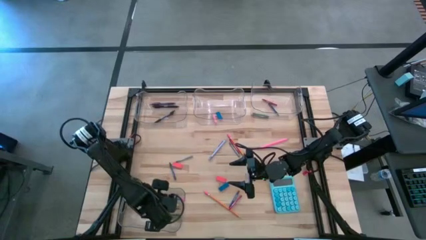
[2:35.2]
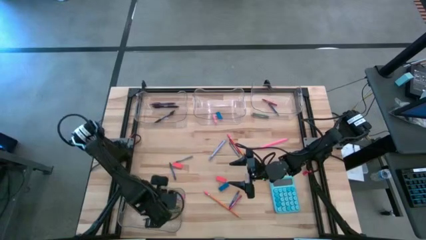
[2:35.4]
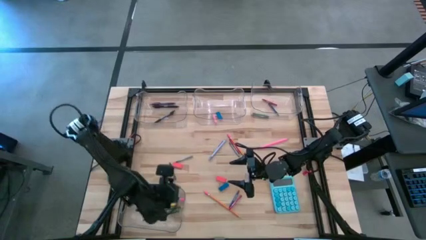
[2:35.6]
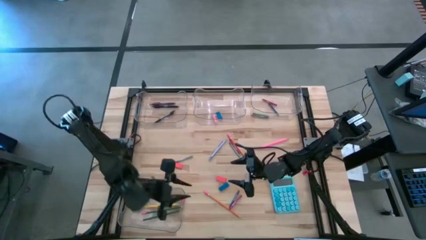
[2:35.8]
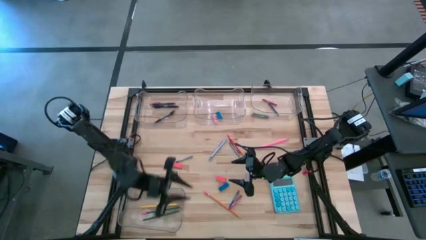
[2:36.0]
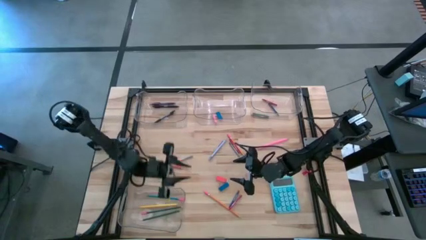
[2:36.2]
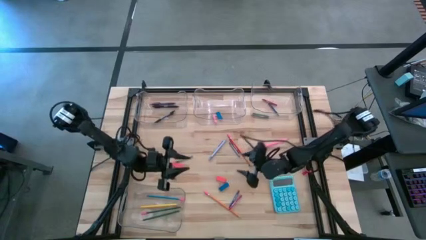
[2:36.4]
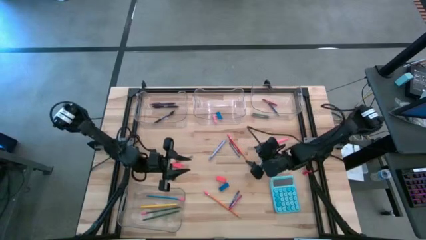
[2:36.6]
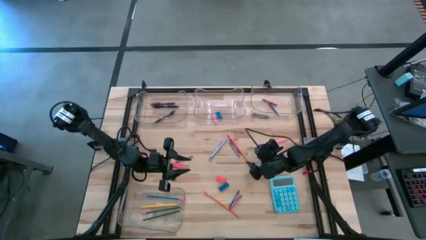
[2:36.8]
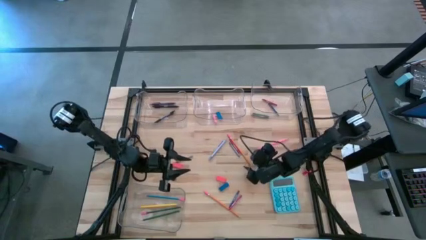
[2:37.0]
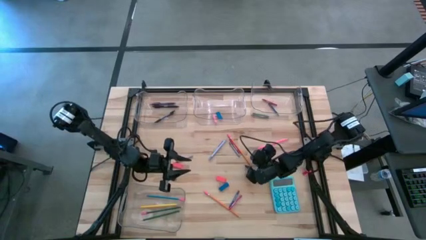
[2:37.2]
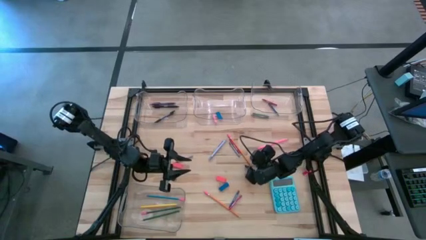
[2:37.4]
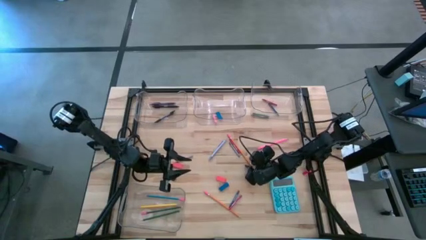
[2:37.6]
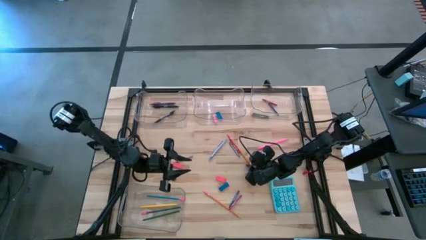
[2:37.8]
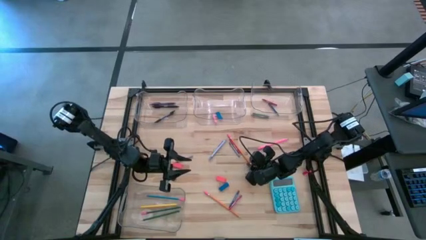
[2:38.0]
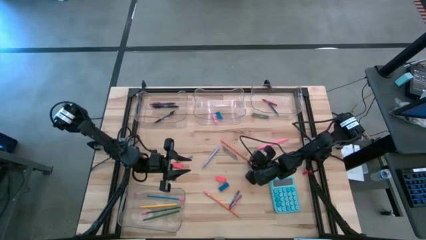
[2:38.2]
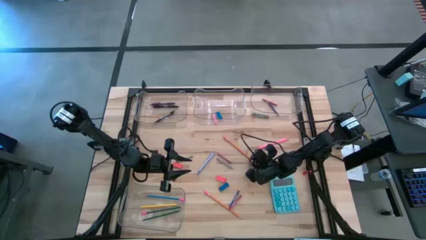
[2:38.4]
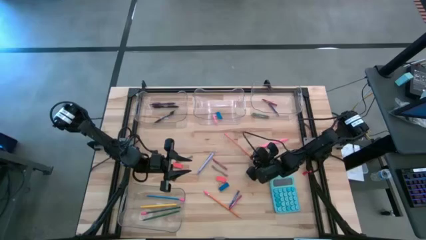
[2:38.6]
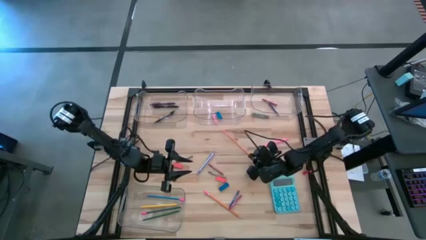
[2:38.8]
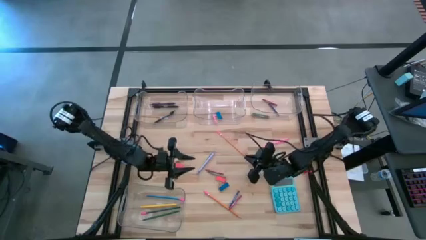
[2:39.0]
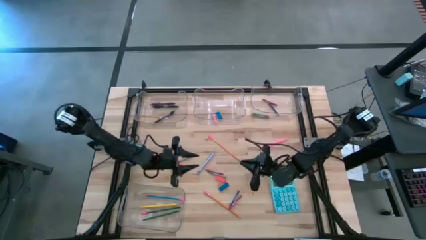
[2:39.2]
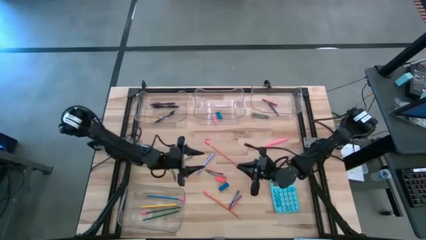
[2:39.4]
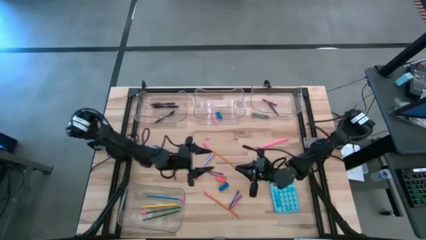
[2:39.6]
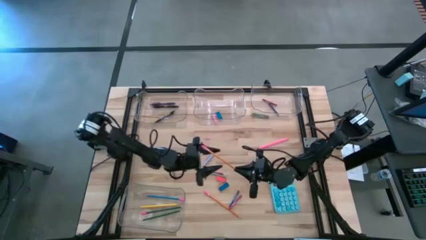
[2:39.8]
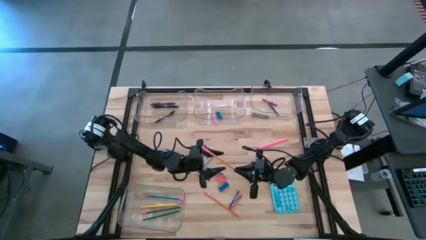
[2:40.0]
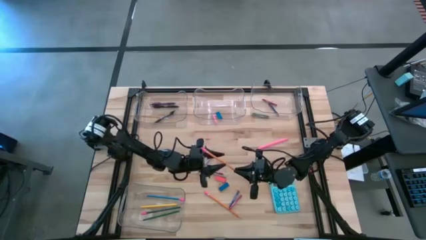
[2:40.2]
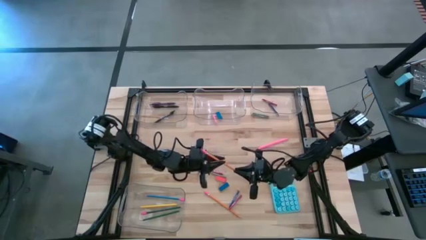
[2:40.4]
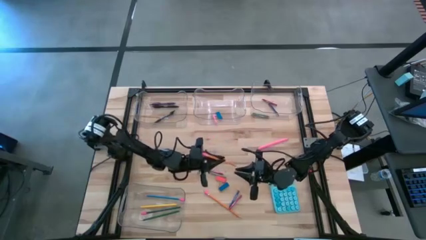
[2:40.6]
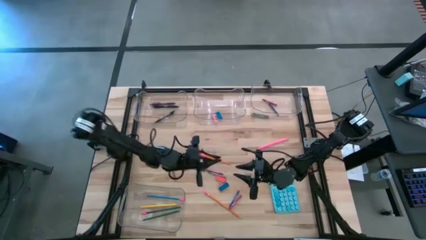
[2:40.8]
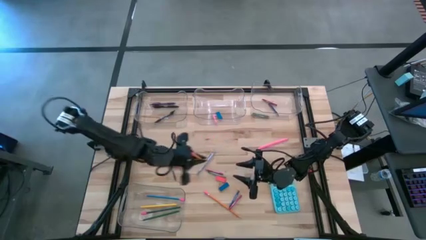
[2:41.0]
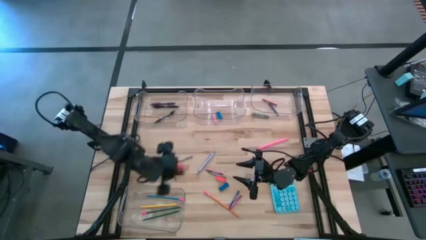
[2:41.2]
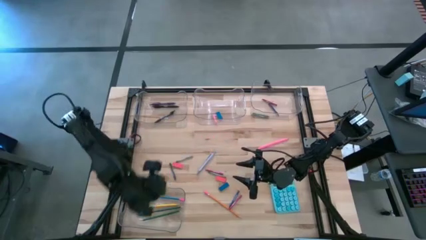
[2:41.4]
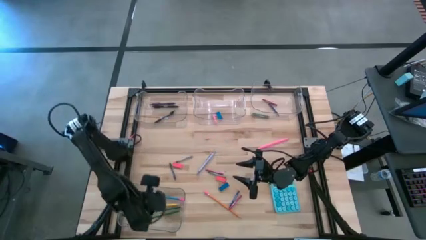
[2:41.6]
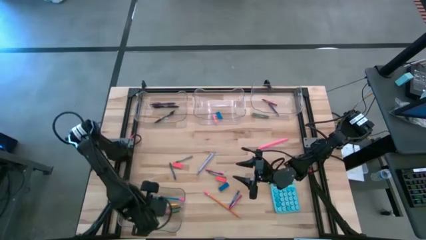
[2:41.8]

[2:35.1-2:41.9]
Task: Sort crayons/erasers/pens/pencils in bins
Put the orange pencil into the bottom transparent bin

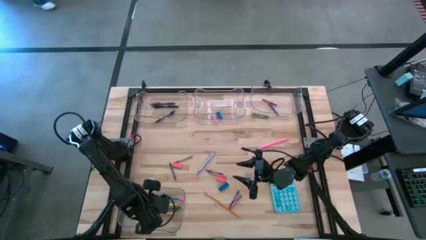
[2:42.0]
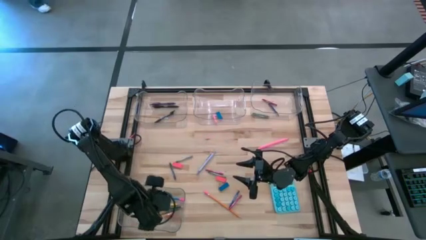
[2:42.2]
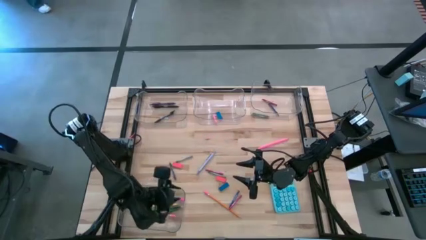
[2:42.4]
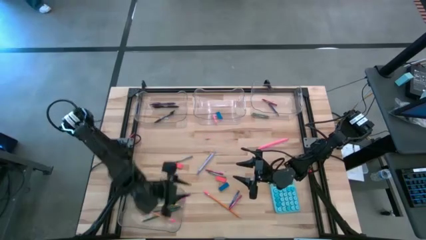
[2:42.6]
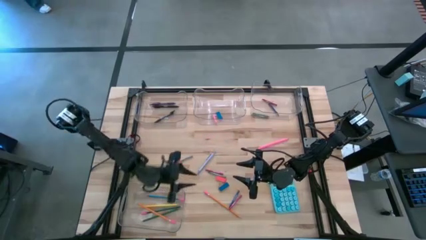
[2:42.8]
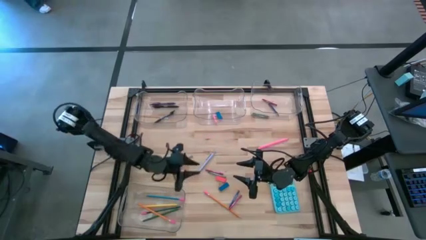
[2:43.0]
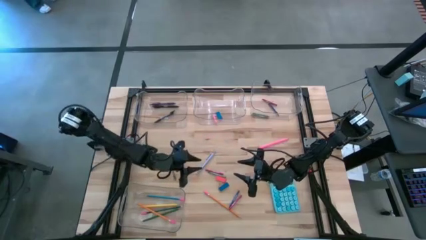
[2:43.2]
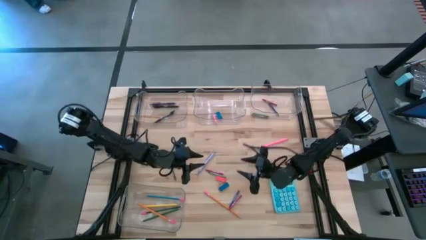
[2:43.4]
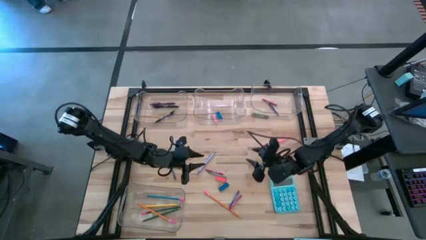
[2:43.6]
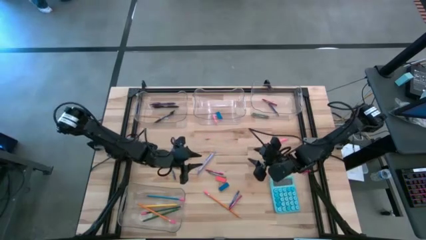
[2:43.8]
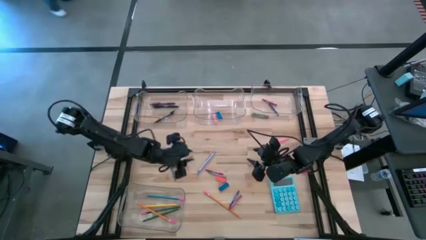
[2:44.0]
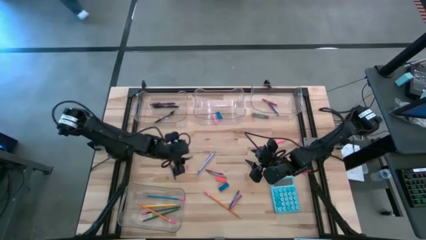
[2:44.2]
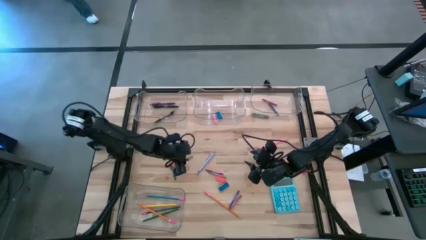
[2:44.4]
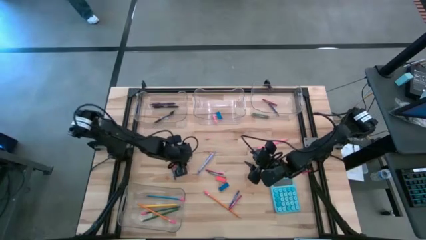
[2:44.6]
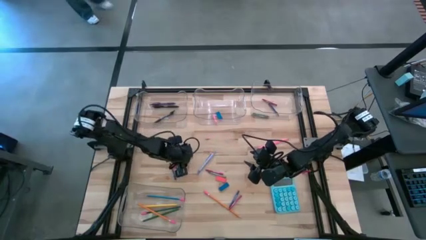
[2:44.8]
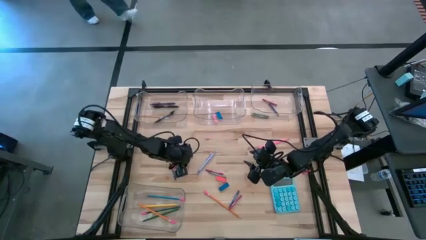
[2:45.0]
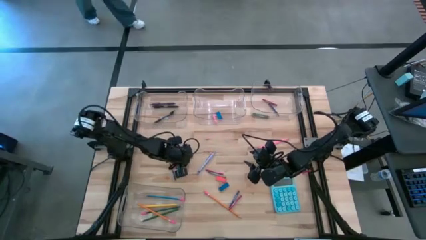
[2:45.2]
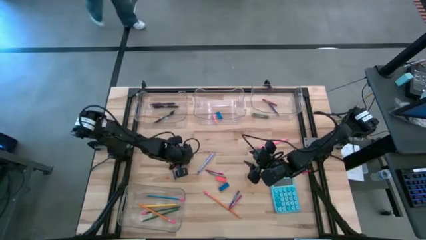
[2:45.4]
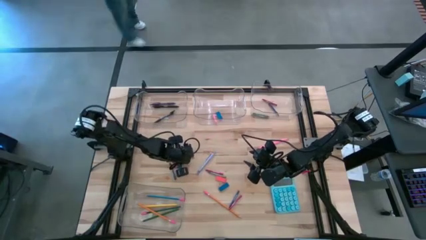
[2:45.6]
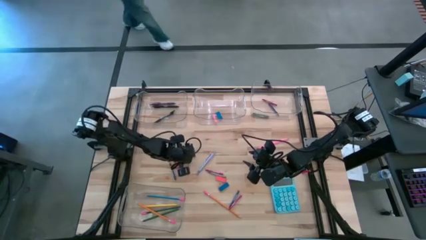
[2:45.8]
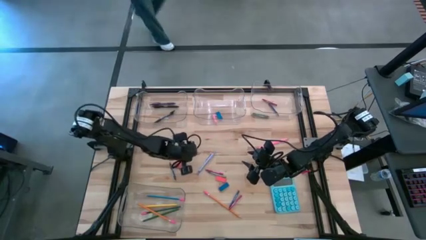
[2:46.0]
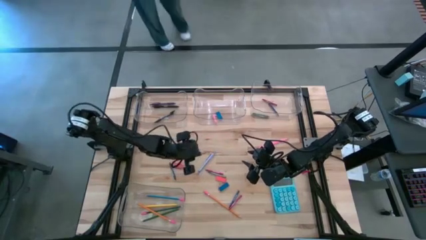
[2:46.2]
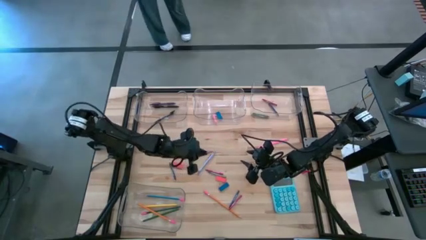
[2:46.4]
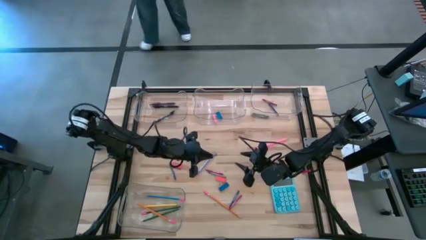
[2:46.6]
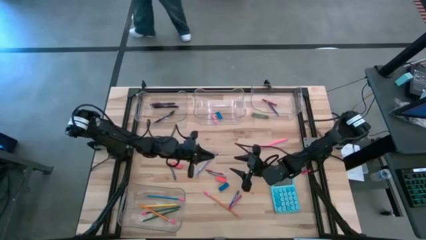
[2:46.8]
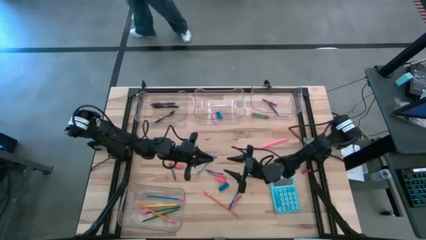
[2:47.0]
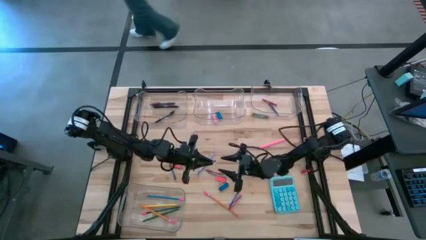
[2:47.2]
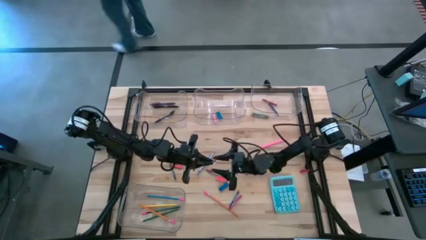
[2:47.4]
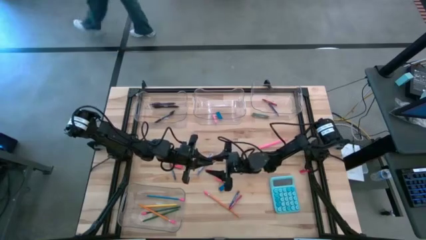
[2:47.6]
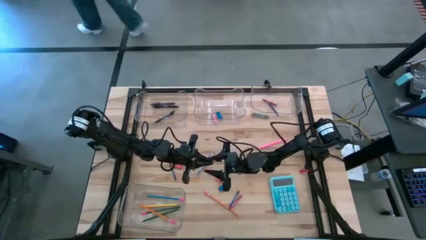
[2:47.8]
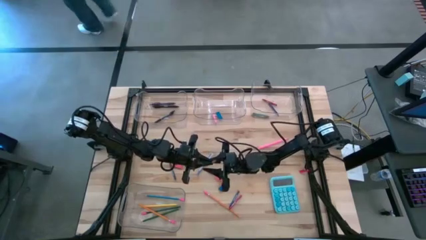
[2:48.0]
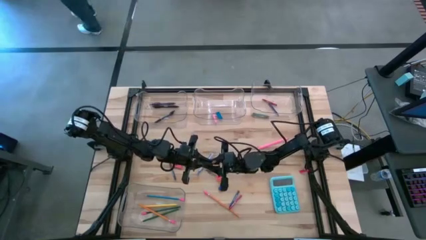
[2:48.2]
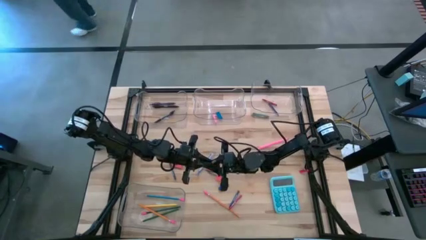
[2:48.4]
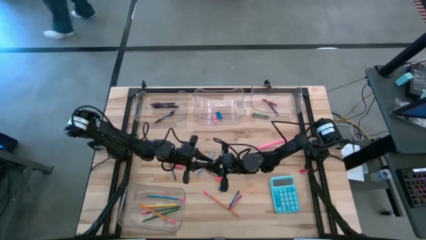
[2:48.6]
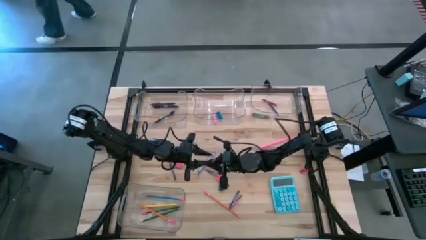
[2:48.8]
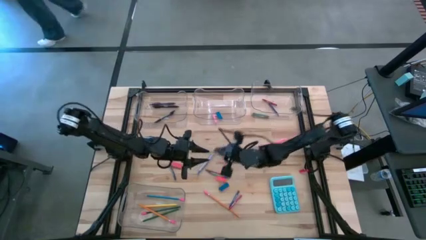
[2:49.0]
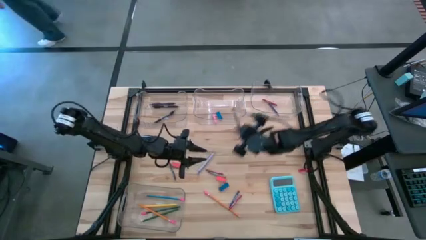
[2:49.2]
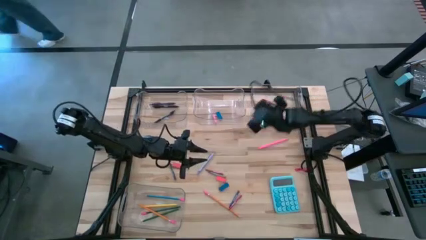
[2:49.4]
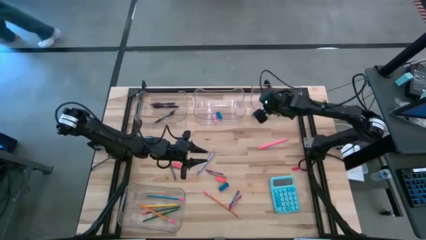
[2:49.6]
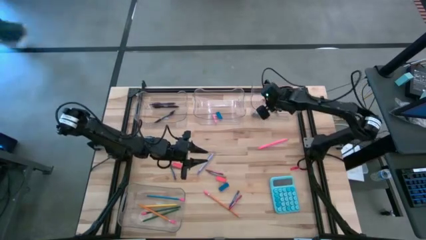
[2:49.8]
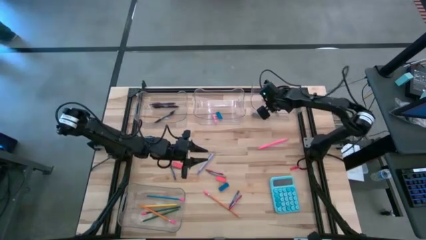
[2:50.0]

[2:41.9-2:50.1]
Put the gray crayon into the top right transparent bin

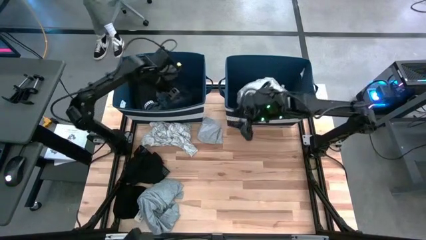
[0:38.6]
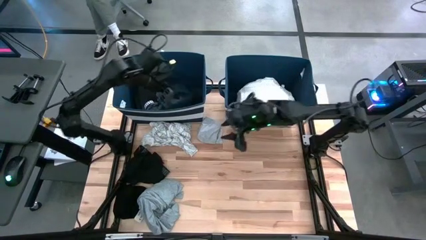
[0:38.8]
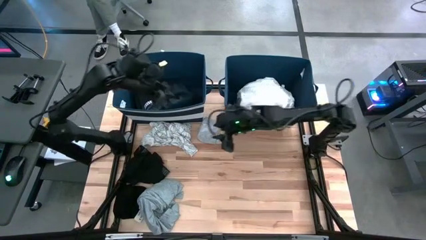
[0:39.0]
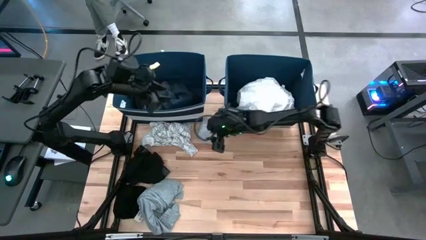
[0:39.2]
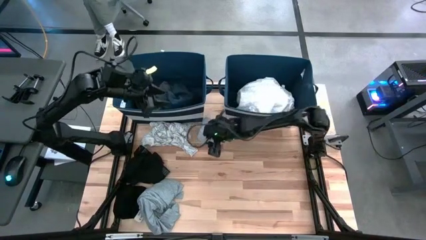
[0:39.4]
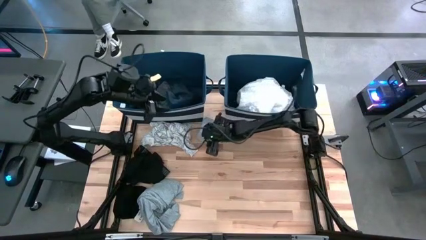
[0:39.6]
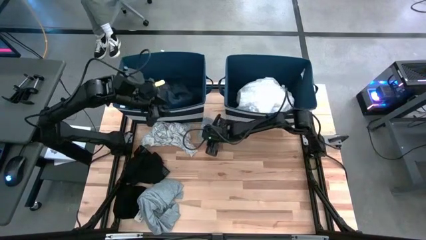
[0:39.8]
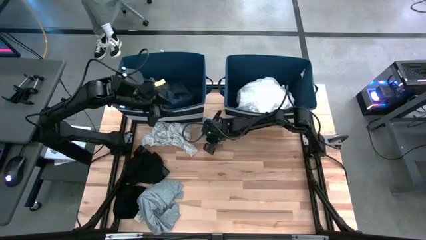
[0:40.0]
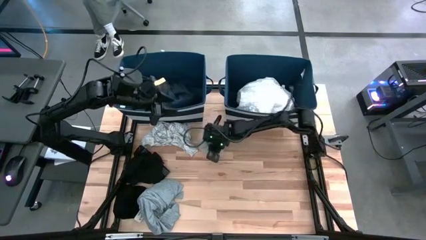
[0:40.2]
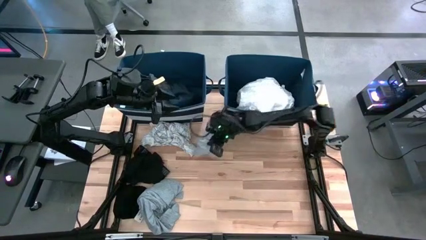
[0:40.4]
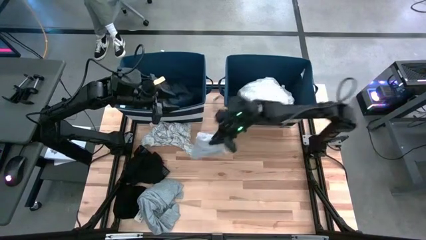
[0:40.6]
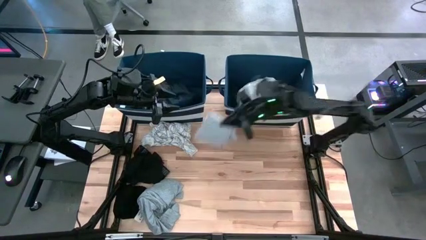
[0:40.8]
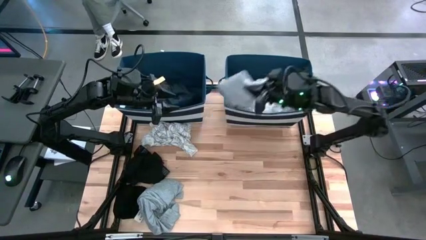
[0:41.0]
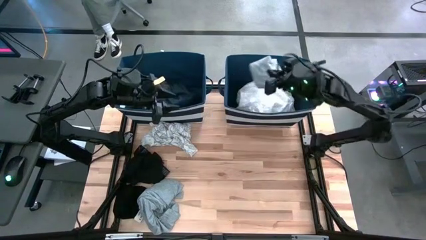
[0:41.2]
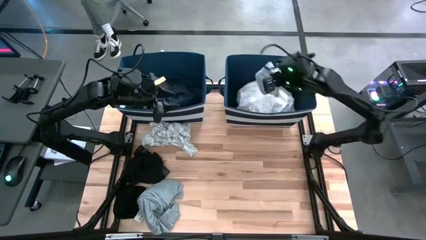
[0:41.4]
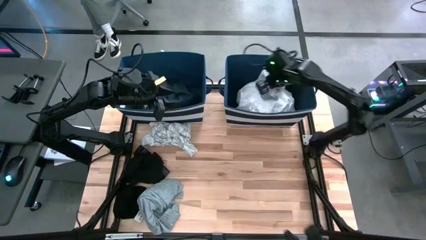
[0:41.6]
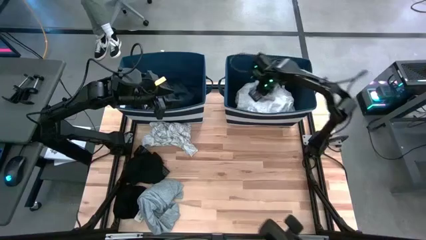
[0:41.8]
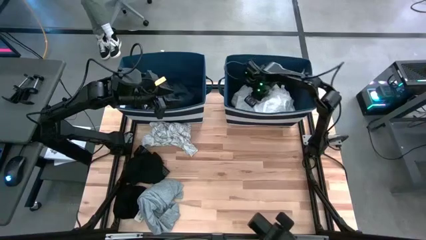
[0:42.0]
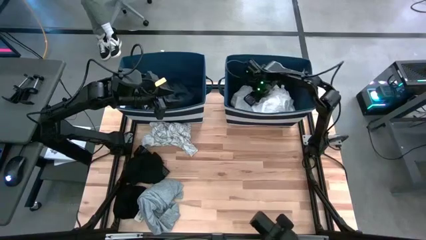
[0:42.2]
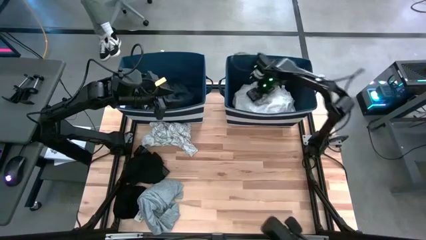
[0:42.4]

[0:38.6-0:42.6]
Task: Sort clothes
Put the gray underwear into the right blue laundry bin
